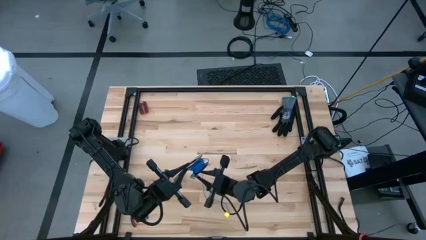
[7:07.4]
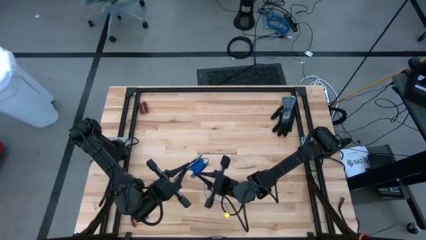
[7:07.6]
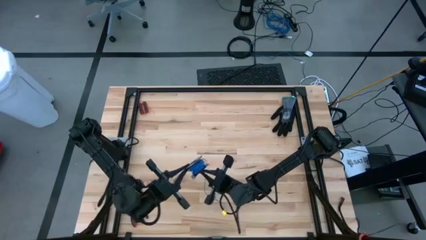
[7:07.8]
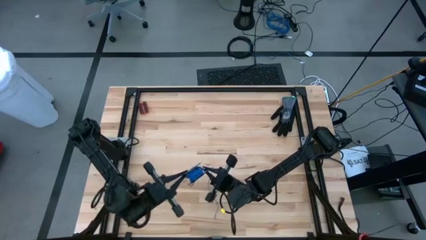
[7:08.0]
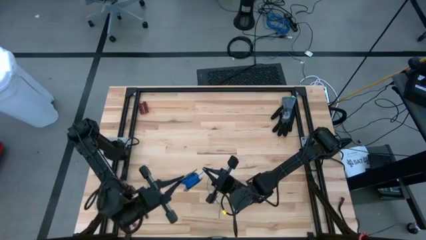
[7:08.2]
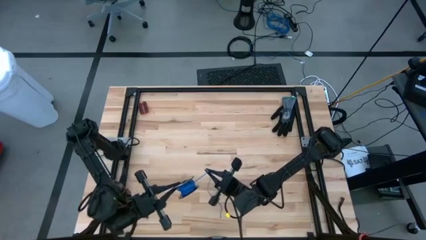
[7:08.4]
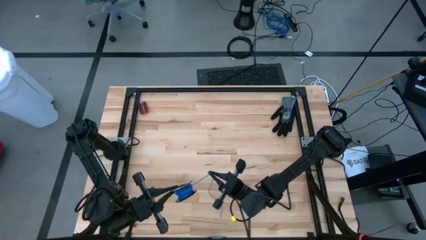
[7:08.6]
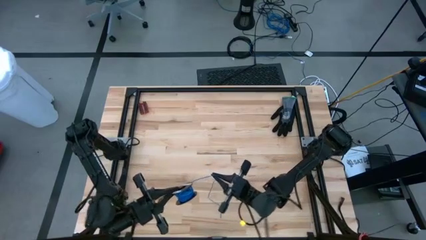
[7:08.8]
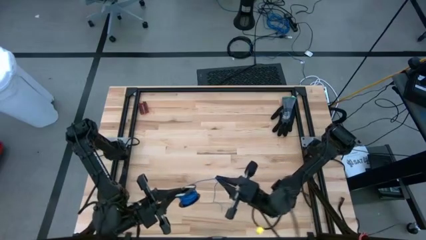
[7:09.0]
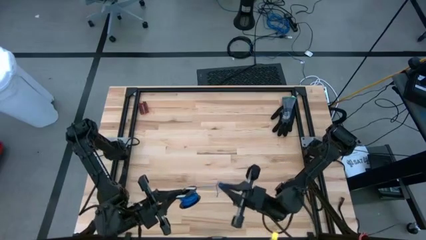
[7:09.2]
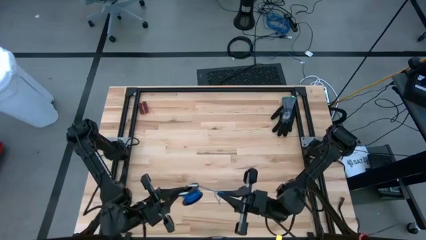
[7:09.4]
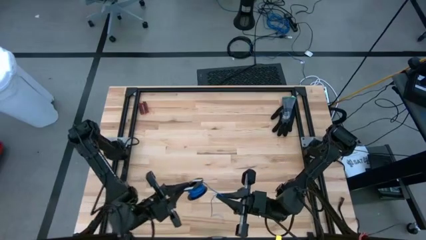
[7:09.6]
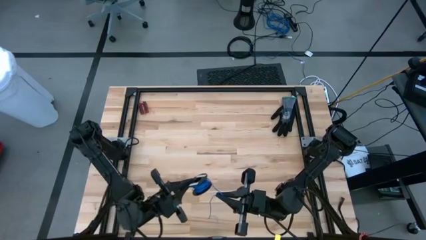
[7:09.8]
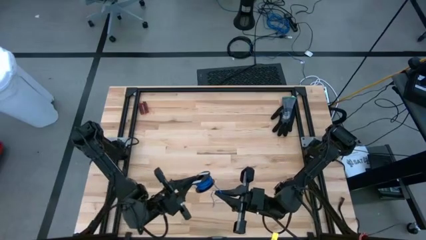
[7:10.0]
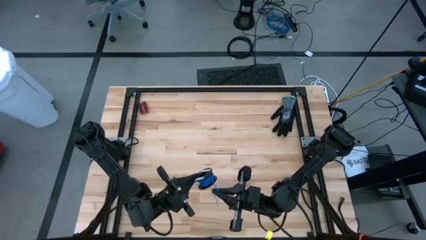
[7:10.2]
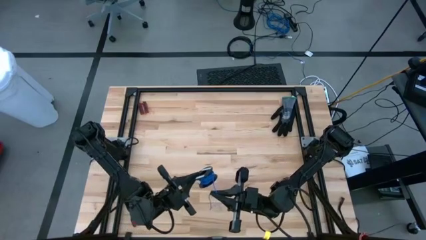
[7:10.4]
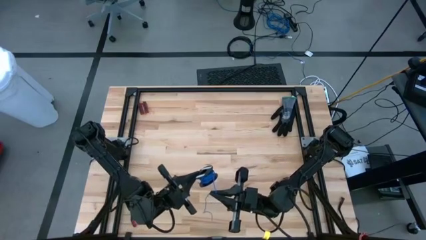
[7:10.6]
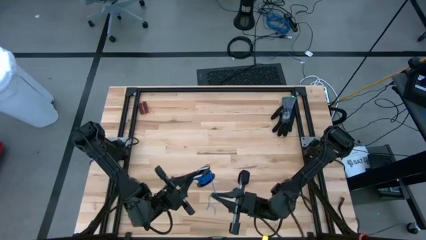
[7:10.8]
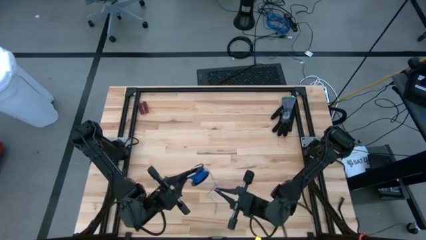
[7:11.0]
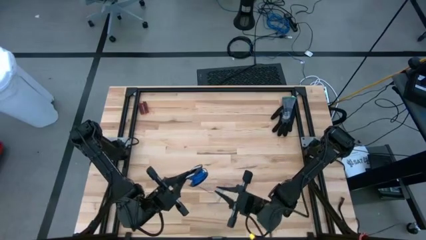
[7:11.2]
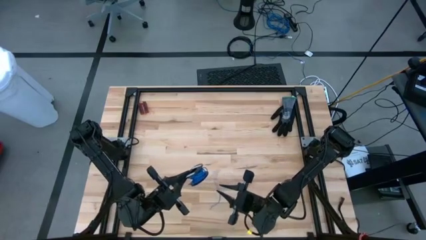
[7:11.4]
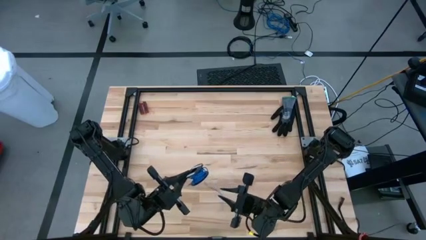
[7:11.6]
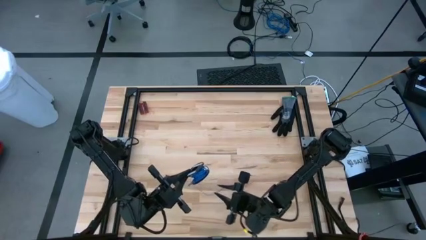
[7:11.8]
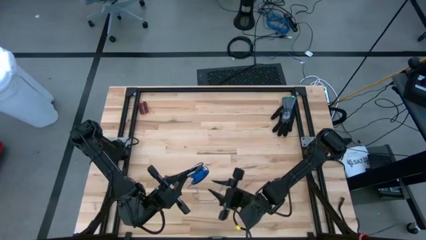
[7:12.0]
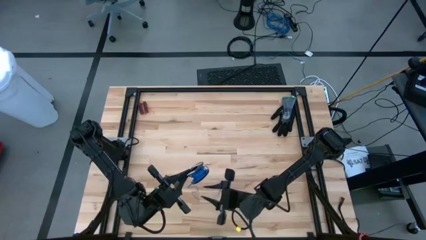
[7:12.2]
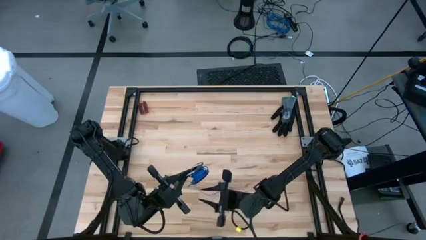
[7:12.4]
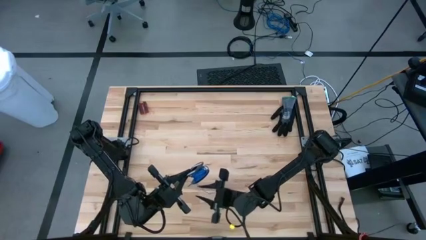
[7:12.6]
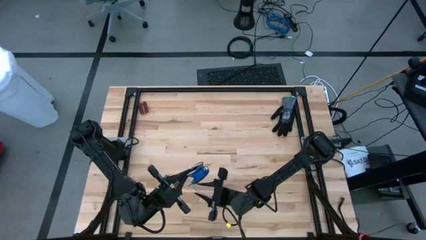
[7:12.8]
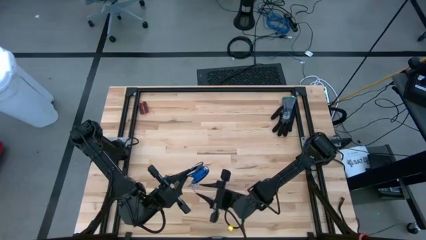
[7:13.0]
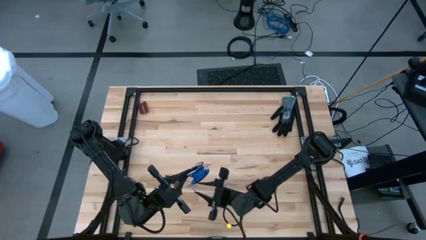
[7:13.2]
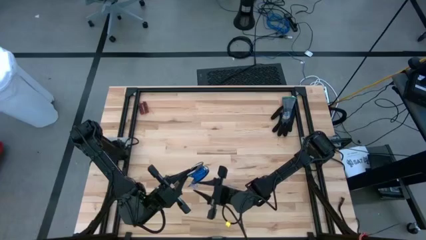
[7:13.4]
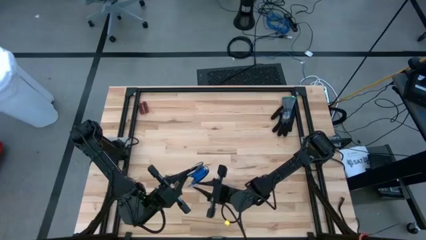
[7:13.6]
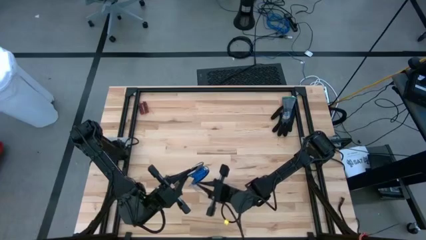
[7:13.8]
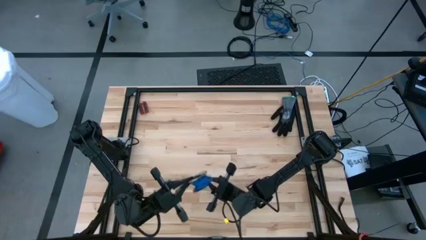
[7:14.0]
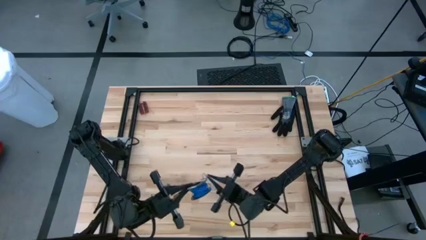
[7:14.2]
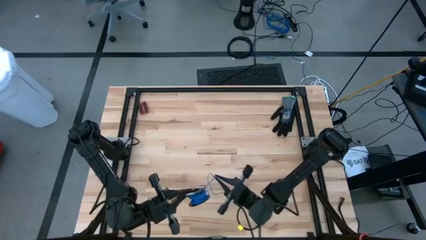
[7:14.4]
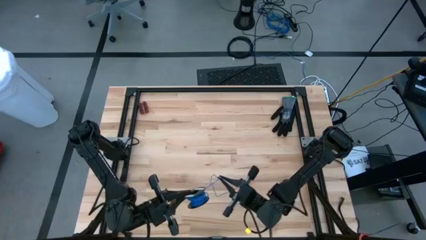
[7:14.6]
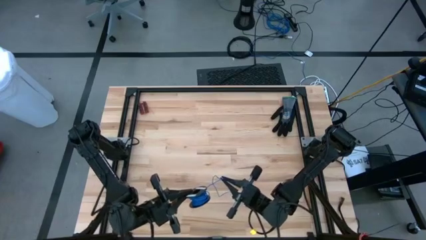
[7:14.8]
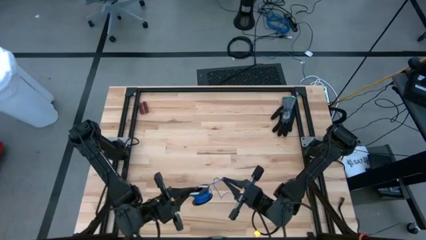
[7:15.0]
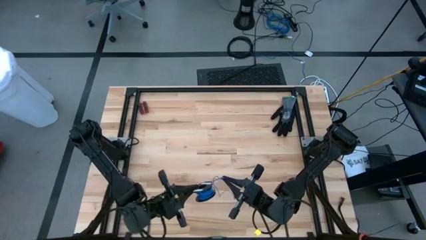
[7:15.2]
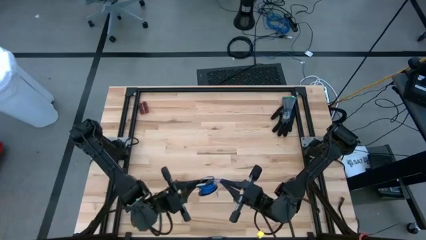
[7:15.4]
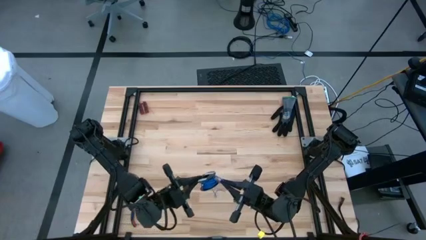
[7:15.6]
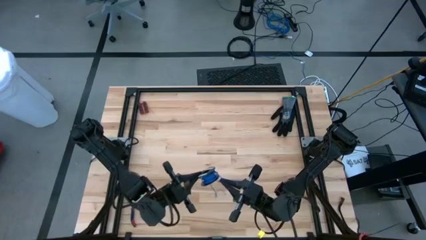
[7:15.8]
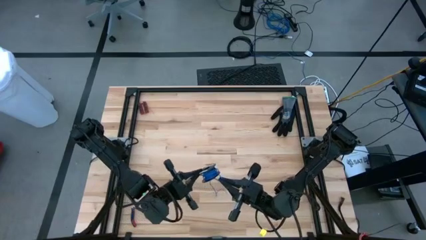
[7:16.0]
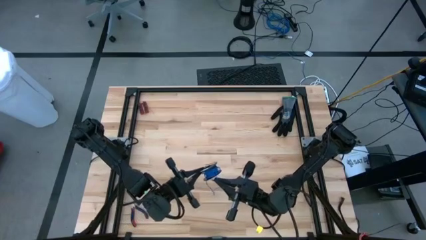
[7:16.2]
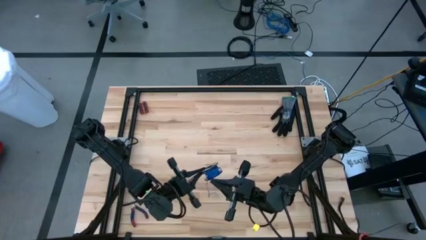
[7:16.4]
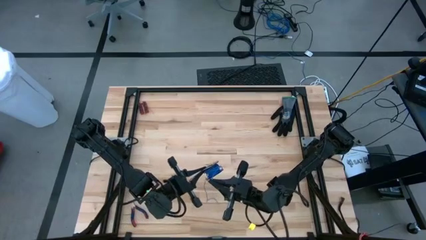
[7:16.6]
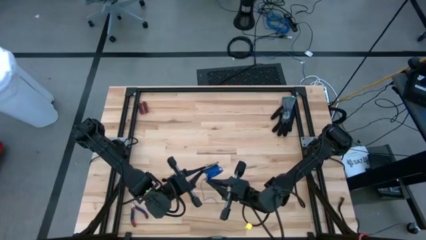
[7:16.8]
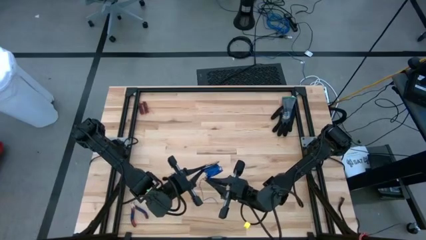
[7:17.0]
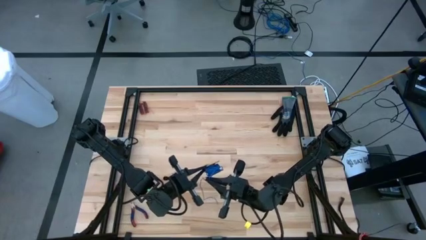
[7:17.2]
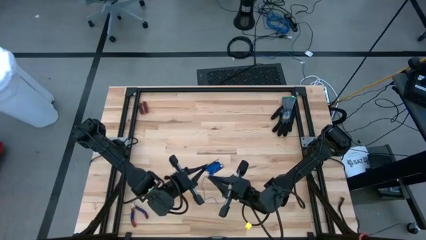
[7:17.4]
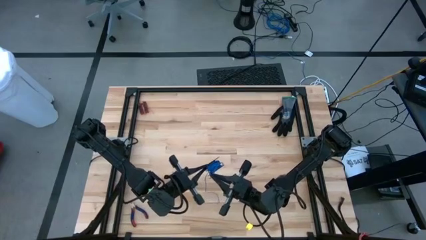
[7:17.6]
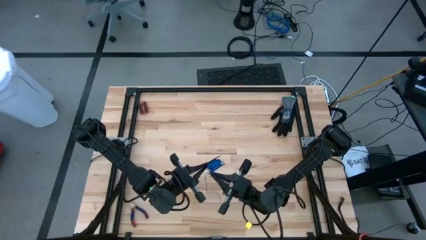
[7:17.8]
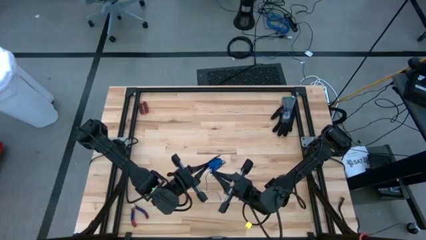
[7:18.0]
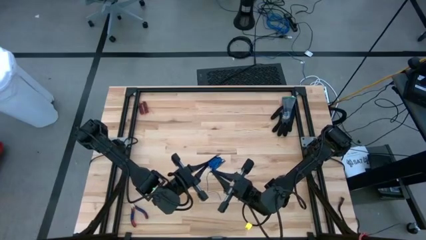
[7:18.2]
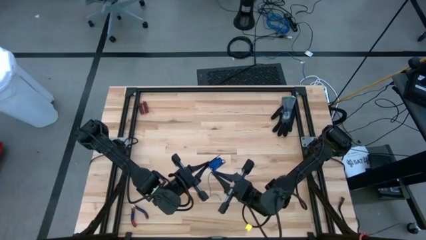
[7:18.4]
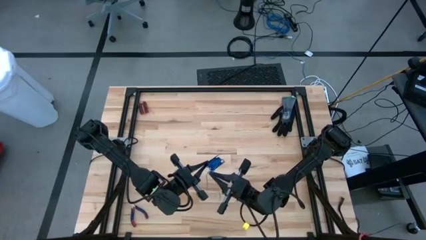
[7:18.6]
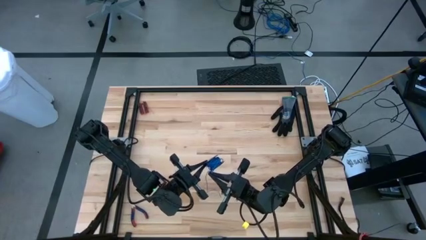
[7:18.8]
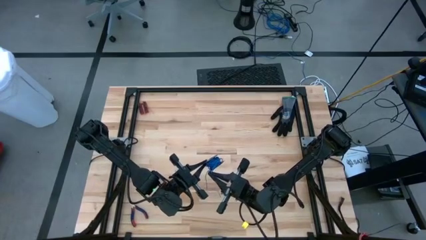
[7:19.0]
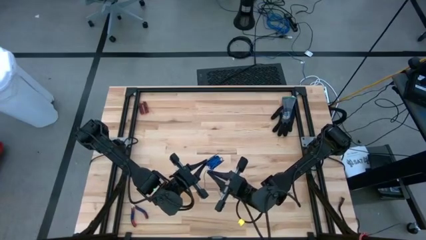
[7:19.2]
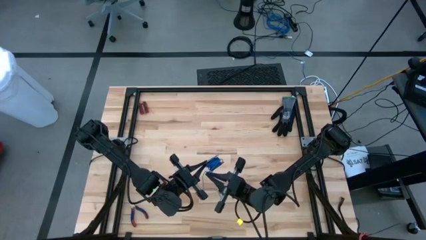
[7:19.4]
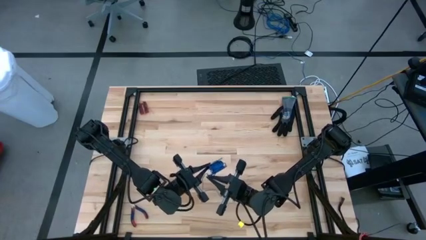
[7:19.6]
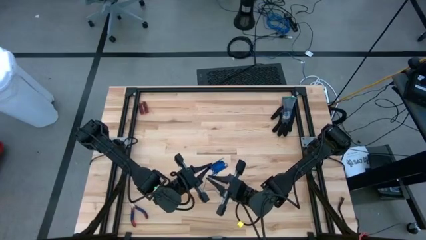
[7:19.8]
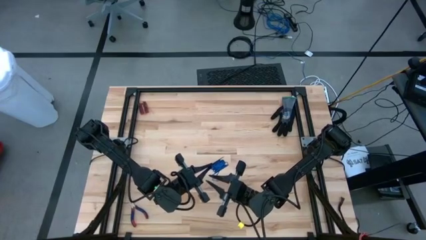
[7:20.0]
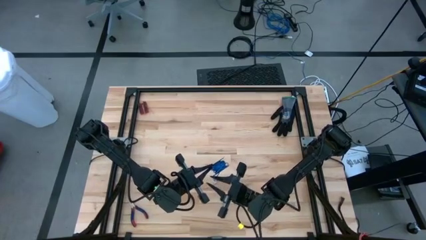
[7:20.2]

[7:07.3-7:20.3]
Task: Coil cords
Coil the green wire onto a spool

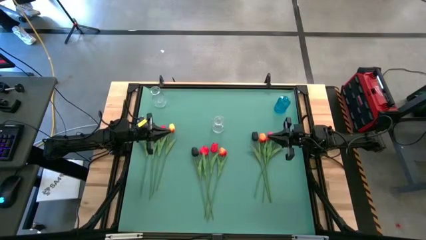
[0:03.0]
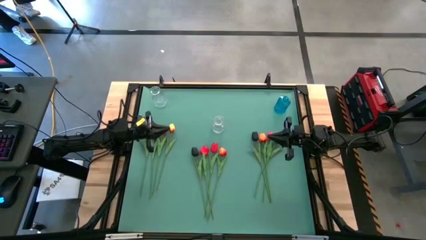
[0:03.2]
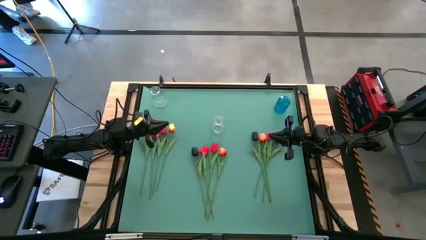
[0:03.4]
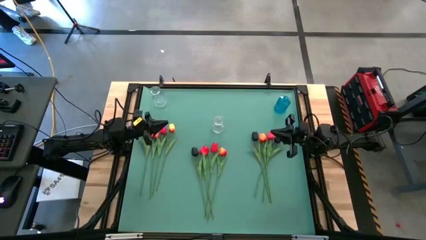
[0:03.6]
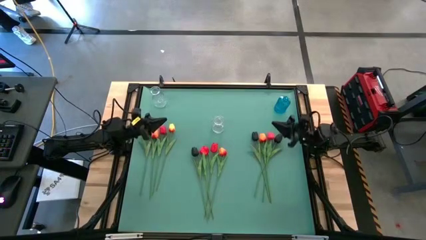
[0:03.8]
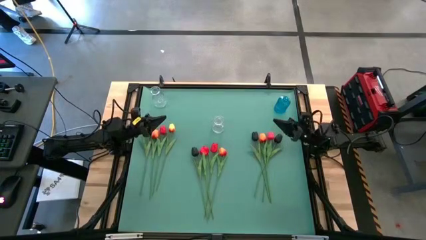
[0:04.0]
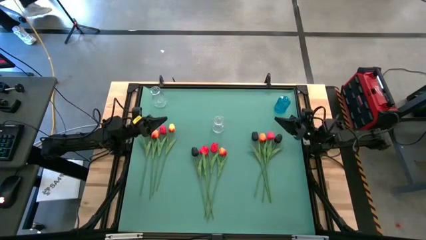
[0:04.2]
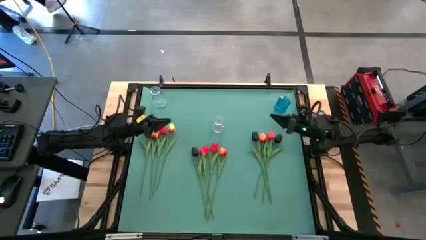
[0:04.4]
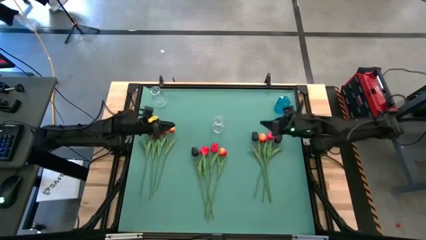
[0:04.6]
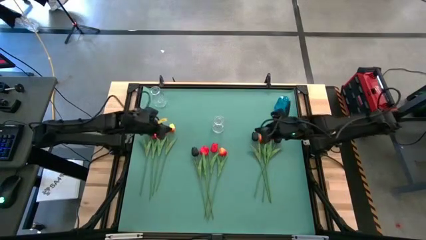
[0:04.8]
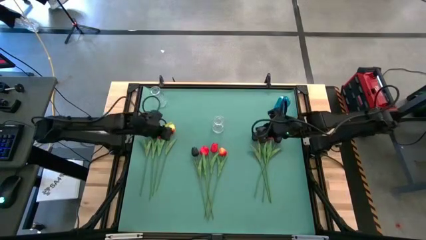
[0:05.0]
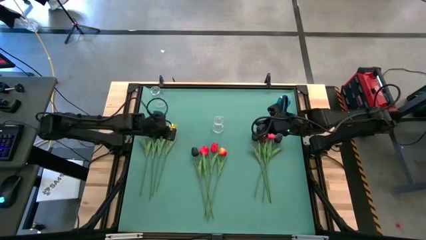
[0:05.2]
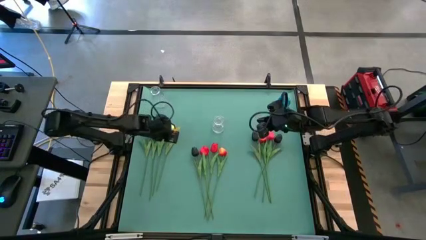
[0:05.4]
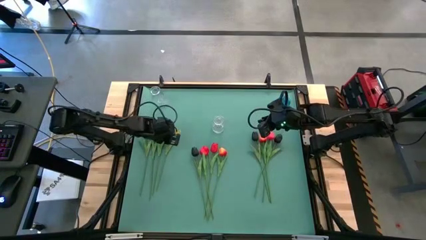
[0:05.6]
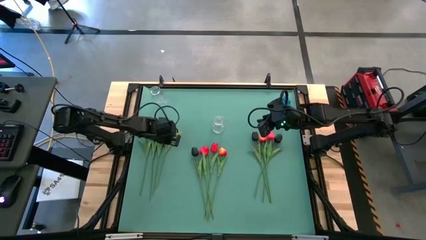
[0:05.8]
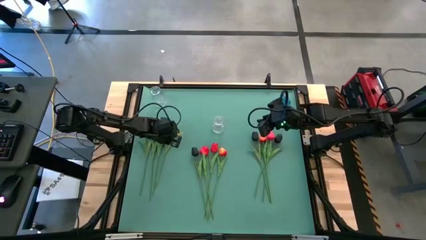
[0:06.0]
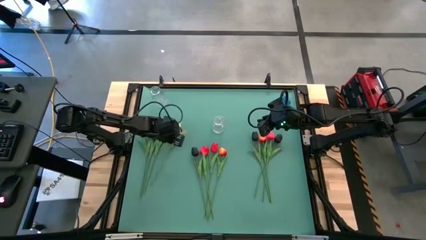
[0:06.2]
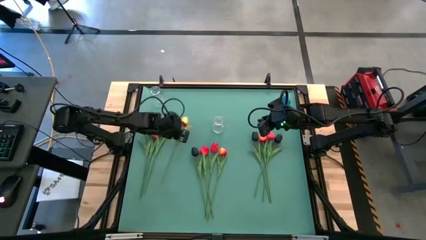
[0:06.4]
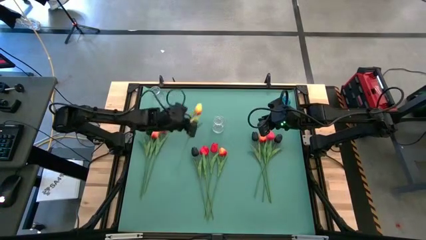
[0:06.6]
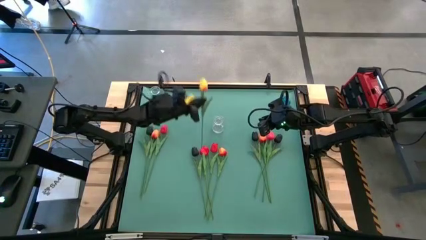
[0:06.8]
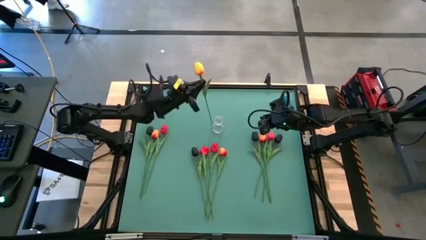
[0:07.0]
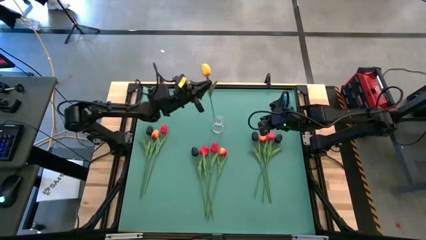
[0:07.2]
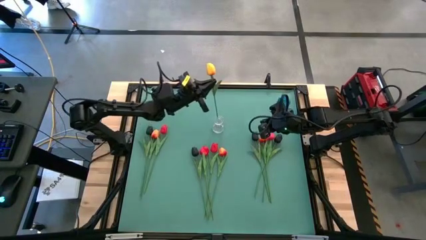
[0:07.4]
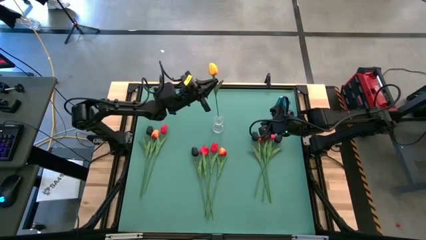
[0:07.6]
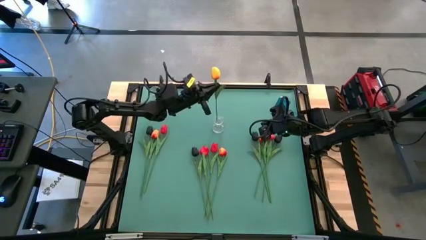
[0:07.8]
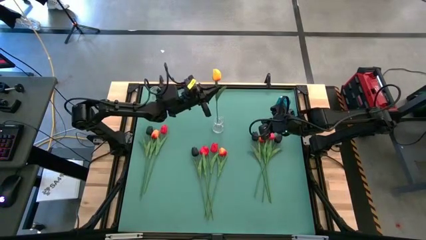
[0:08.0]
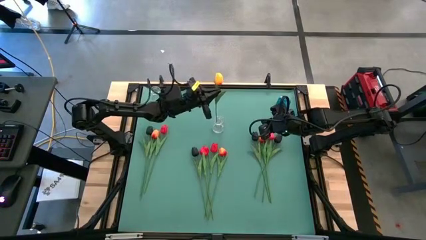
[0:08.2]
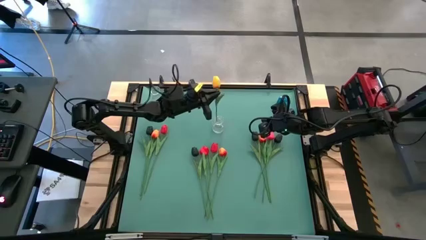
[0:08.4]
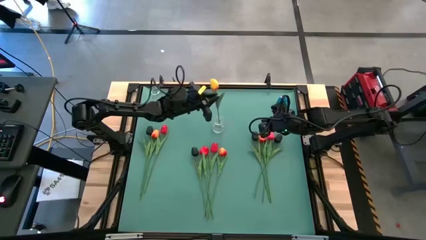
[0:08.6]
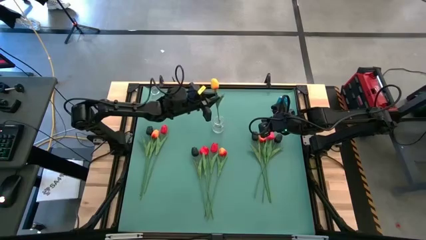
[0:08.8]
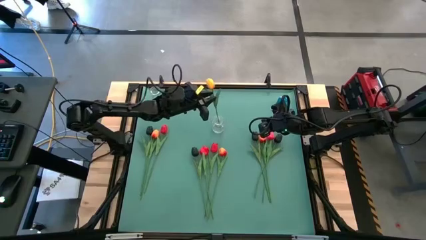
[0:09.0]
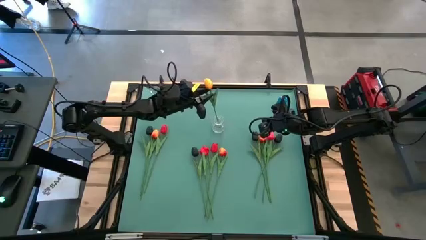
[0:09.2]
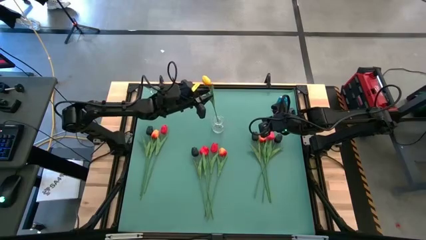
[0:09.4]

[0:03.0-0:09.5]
Task: Sort flowers into vase by color
Put the orange tulip into the right transparent vase
